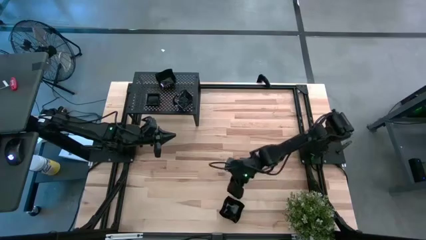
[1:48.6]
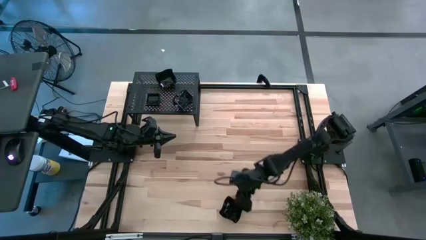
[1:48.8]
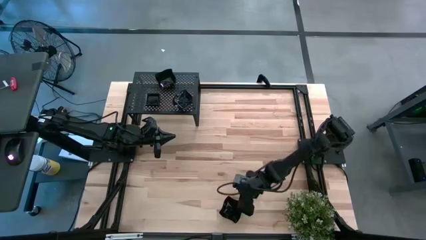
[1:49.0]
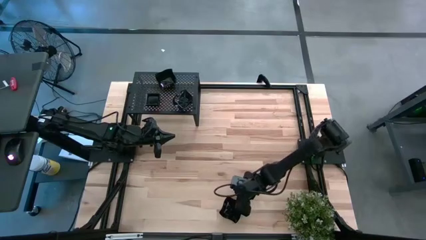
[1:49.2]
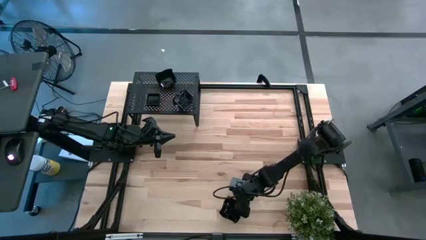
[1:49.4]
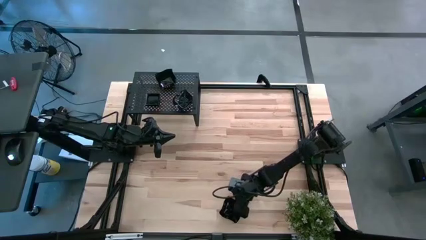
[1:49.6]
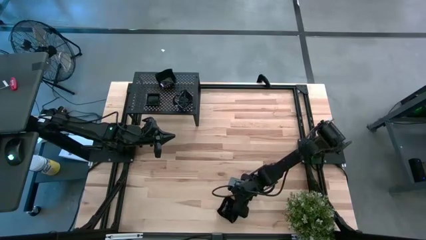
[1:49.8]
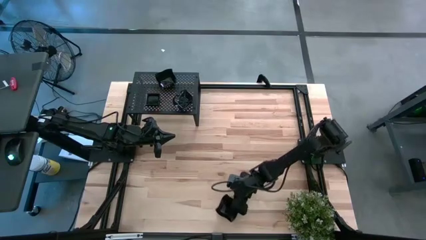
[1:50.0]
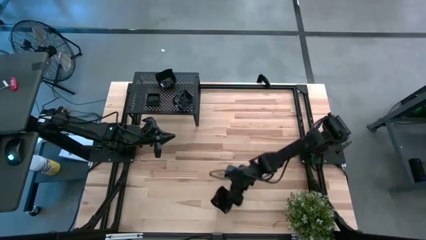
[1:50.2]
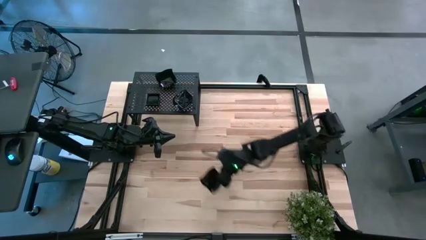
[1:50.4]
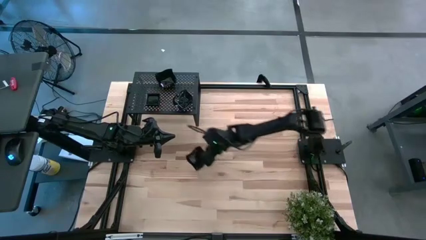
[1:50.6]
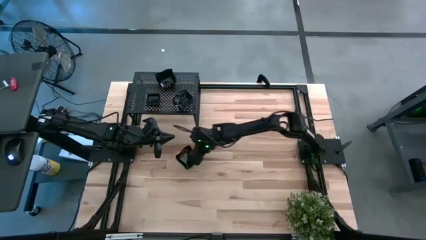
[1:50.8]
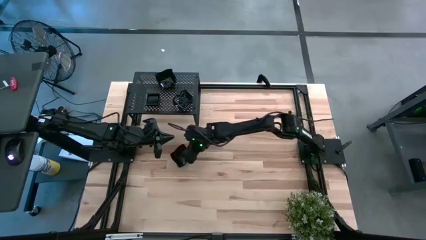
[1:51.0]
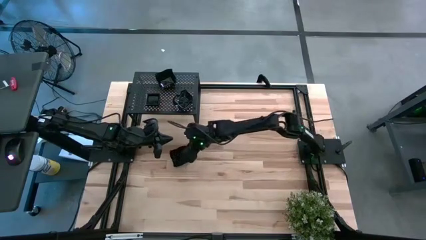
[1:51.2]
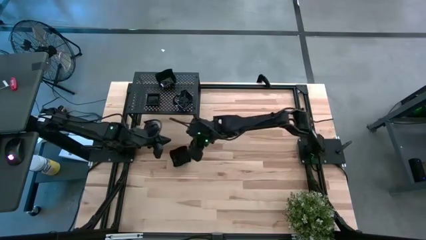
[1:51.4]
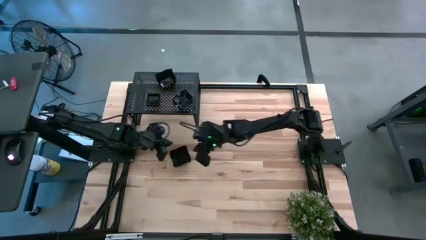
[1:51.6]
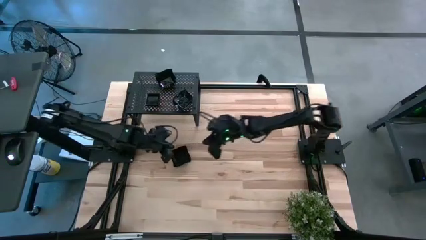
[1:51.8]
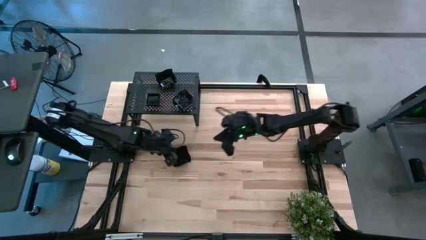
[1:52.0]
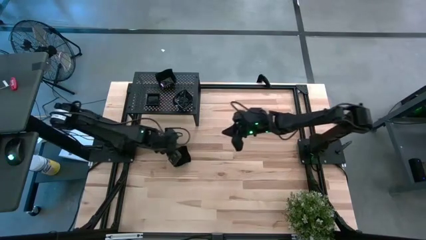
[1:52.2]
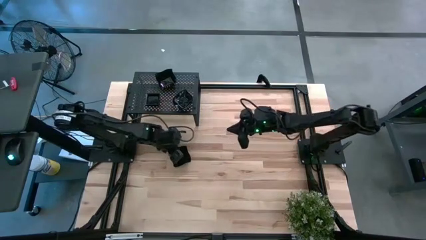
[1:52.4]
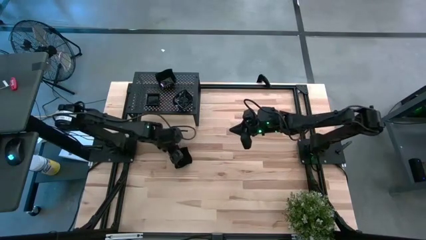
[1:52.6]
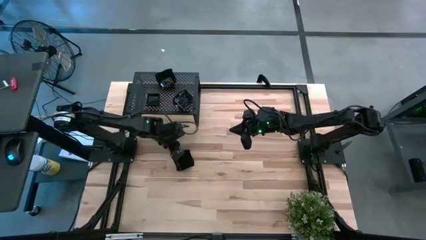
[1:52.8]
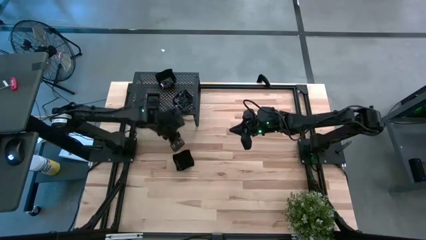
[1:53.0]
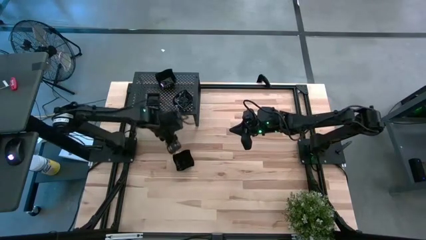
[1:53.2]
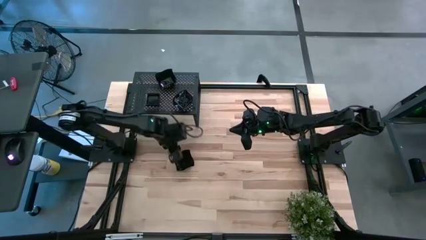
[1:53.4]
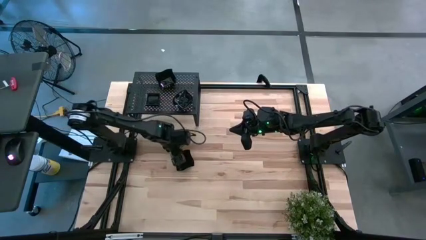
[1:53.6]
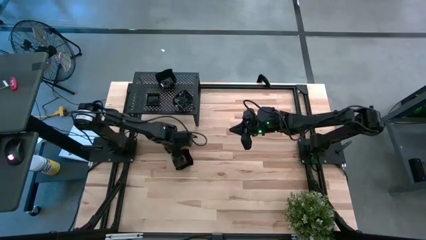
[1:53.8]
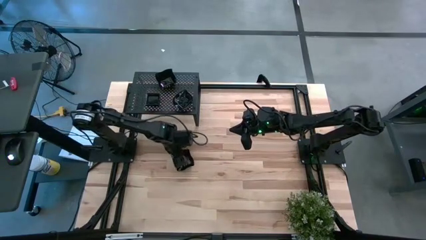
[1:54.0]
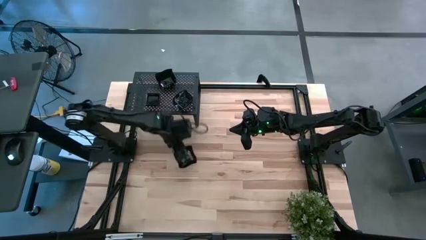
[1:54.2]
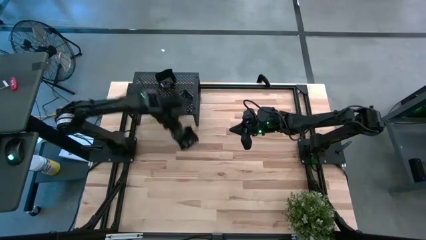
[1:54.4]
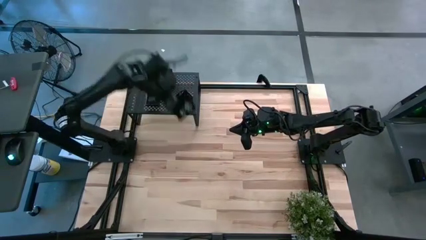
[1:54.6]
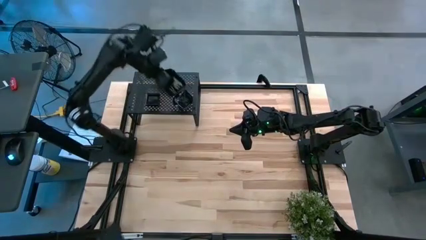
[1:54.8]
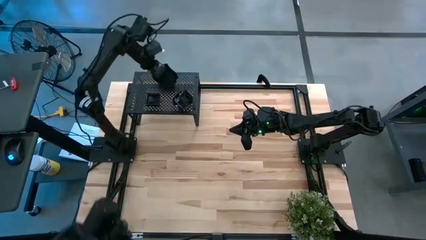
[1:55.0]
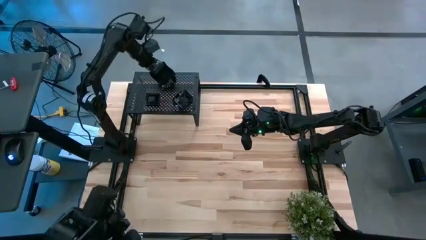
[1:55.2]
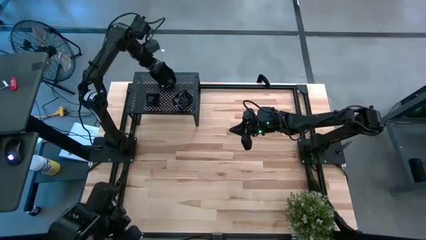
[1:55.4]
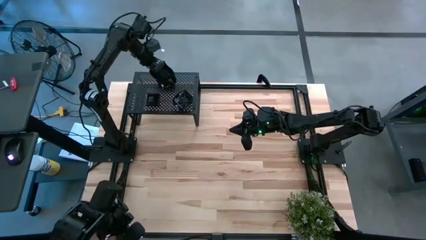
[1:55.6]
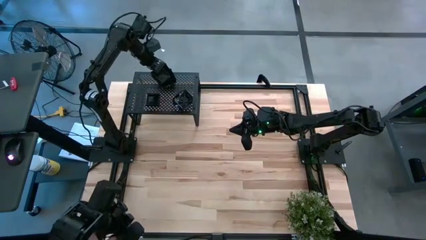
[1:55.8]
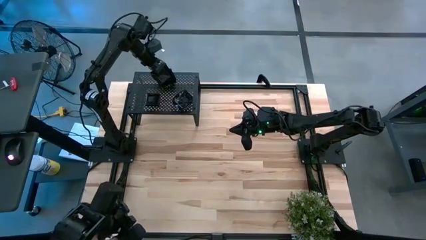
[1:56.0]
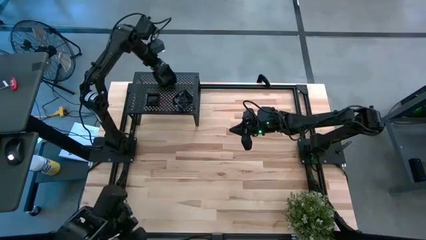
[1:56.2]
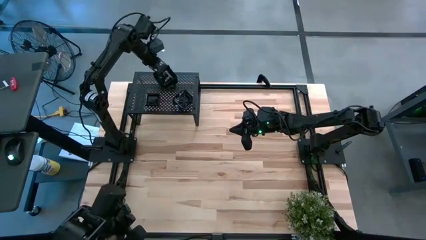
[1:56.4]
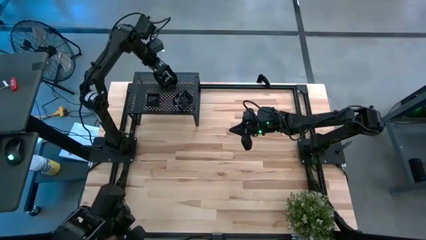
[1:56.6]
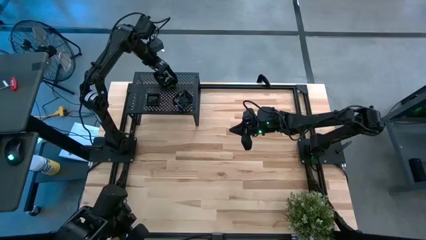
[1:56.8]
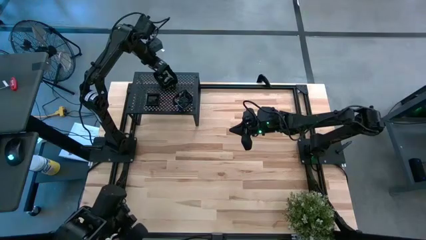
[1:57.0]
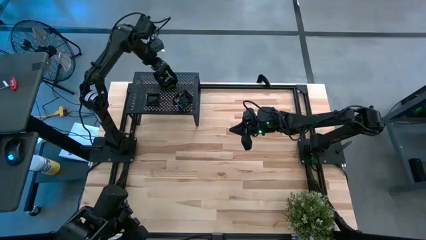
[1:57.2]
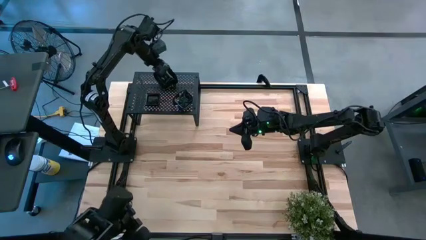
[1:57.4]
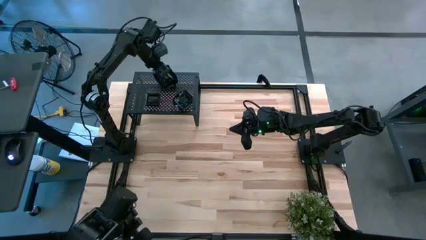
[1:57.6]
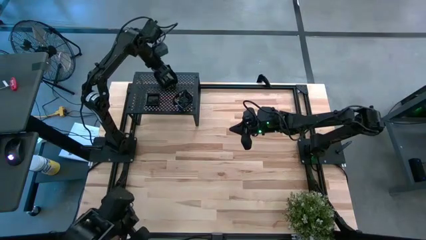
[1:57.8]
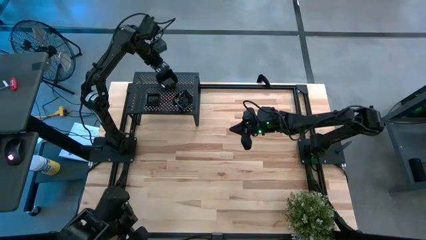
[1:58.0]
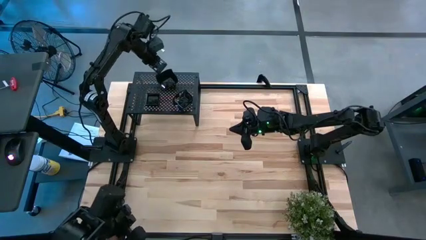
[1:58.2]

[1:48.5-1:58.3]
Task: Pick & Place Mini shaped plates
Stack the black distorted square plate on the other black distorted square plate on the shelf

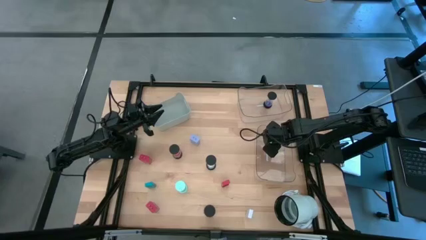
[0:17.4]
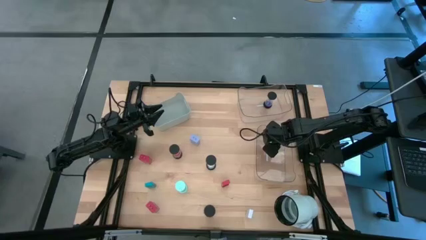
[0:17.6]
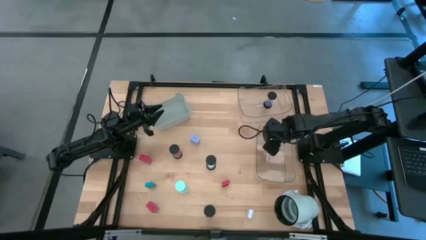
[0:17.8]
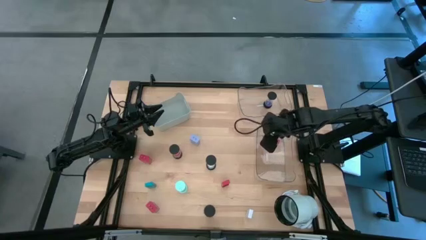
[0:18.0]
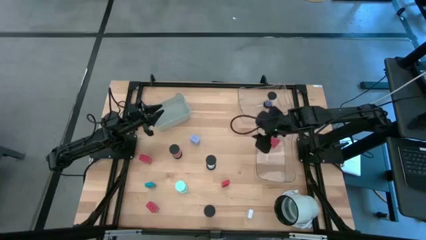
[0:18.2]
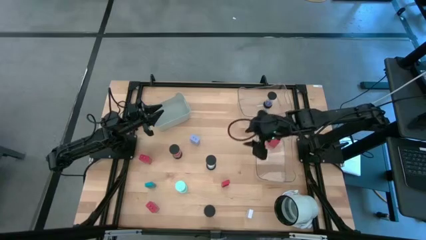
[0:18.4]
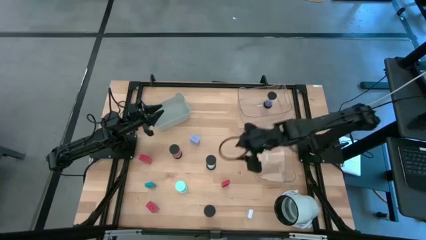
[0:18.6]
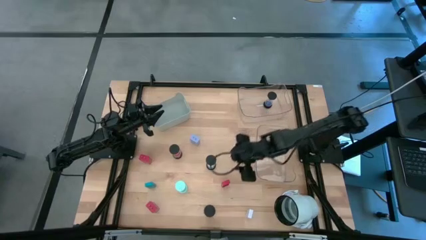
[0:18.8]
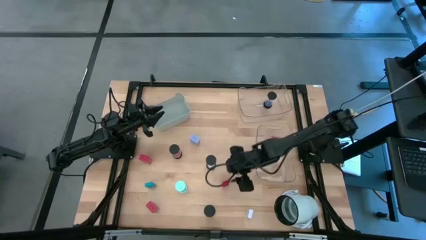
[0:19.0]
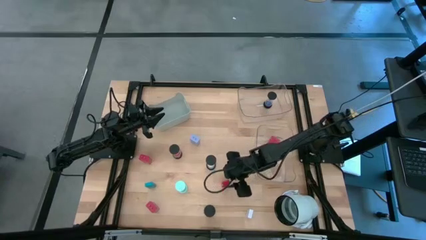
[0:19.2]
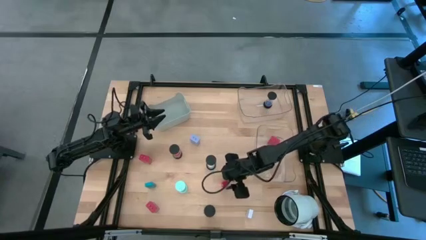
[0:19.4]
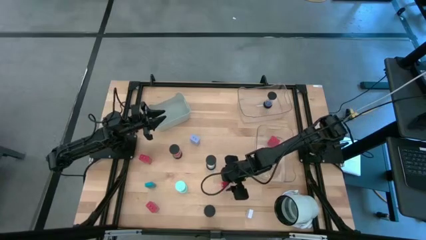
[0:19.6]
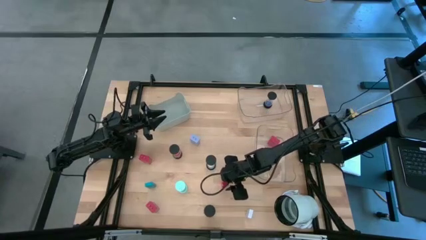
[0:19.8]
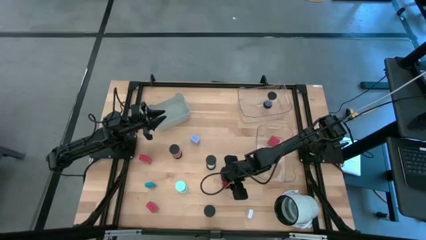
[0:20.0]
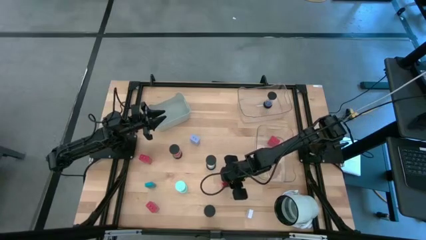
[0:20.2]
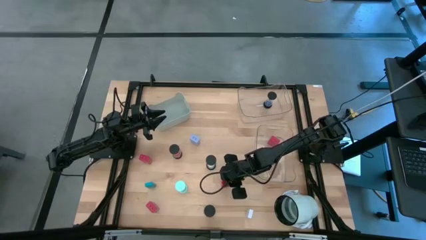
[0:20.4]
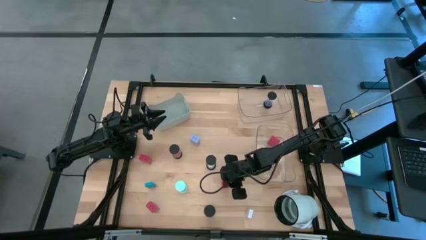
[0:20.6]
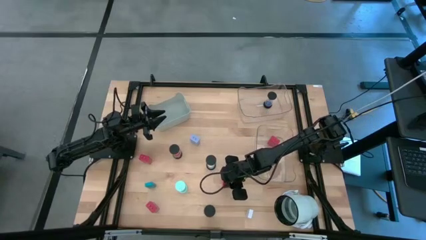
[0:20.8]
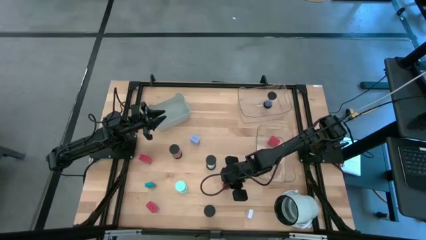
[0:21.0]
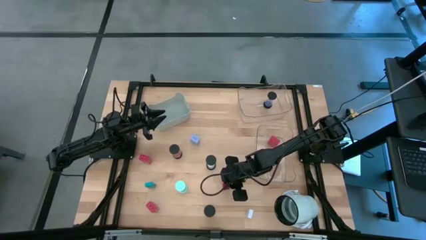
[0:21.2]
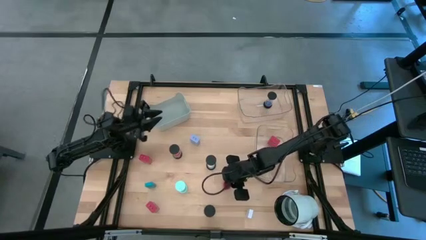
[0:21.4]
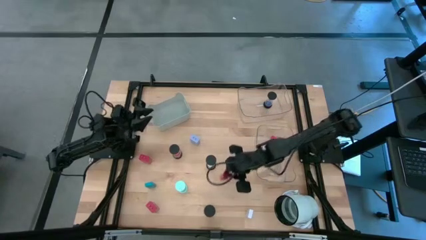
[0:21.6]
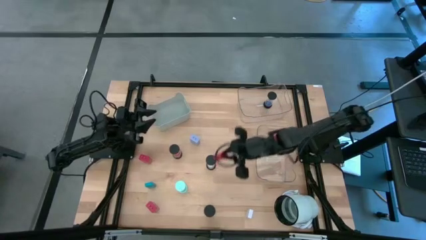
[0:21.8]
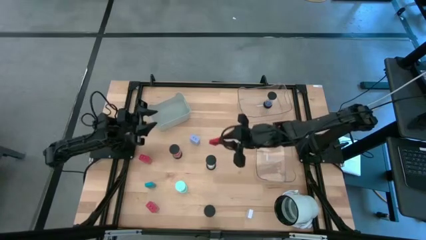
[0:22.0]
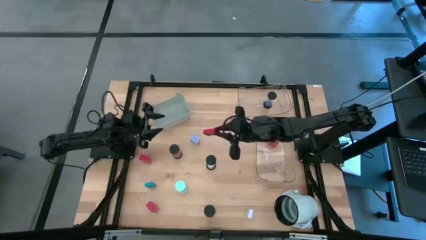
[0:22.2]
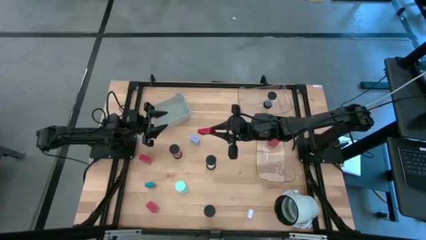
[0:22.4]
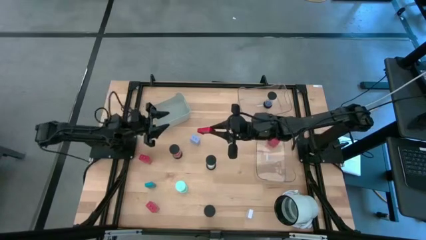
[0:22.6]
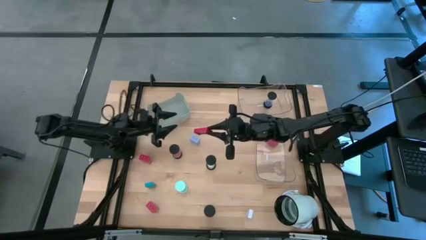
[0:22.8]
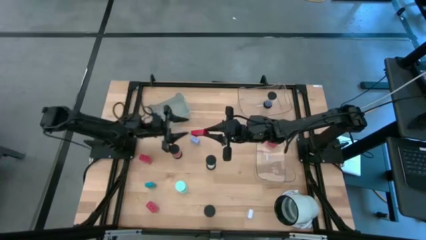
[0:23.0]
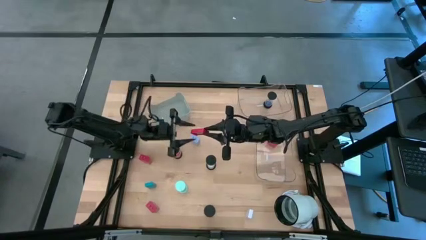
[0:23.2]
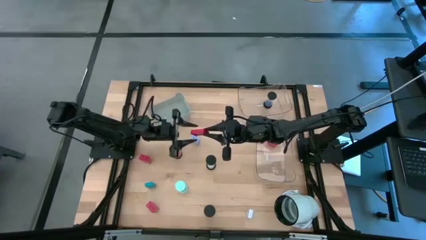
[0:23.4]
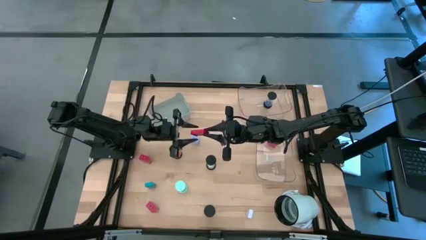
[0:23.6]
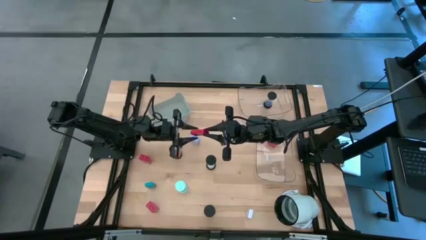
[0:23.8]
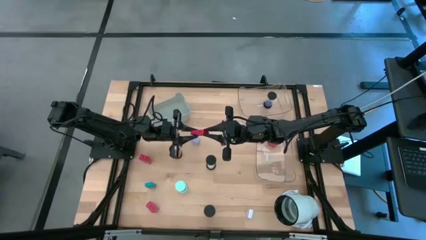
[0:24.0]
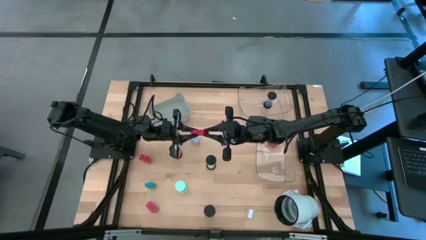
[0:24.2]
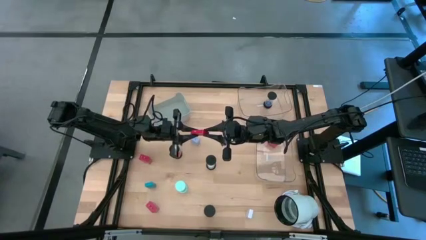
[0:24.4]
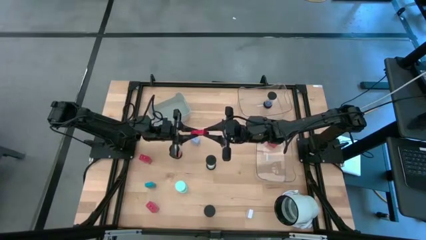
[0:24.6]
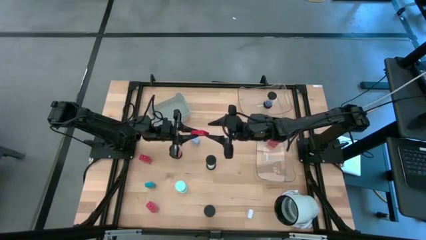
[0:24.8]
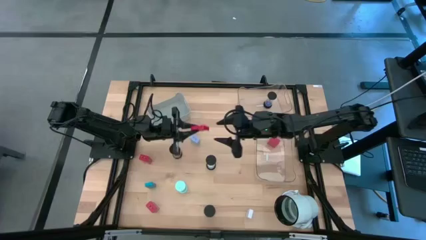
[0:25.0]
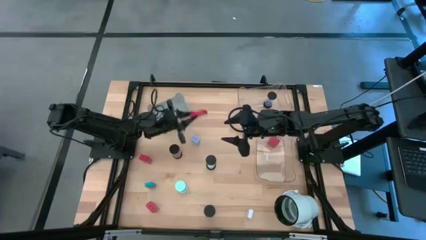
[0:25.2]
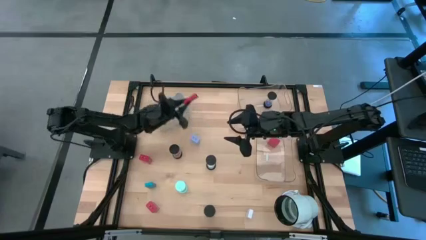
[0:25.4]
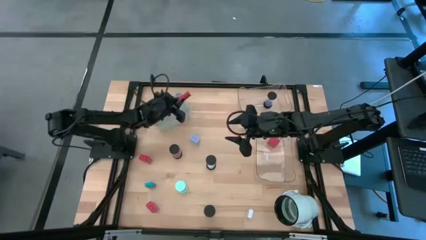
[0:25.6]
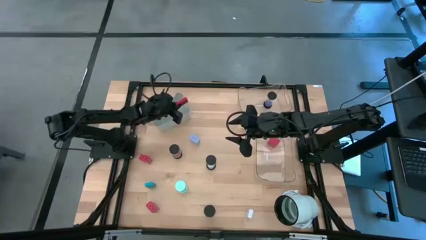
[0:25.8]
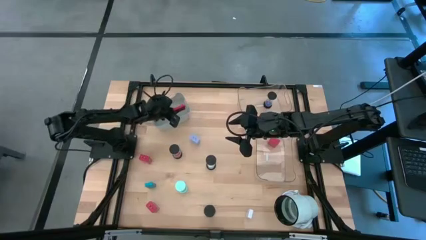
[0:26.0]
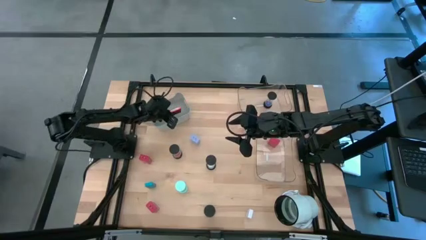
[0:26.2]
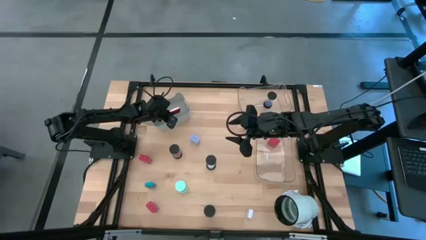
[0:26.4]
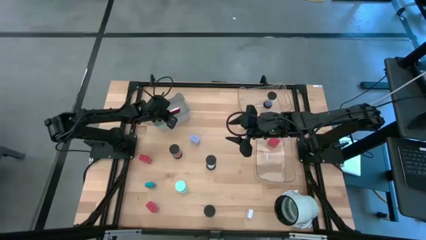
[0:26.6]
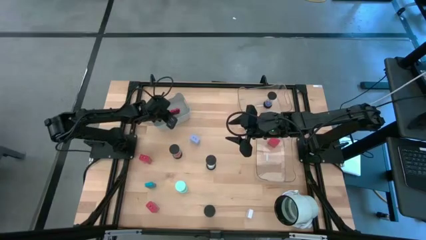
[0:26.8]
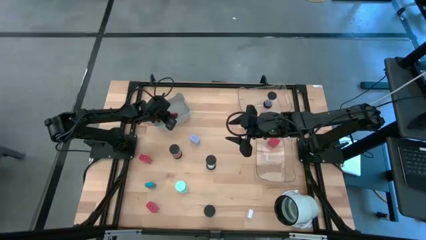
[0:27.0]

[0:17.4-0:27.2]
Task: Pick & Place Office items
Put the red digital clock into the gray bin
